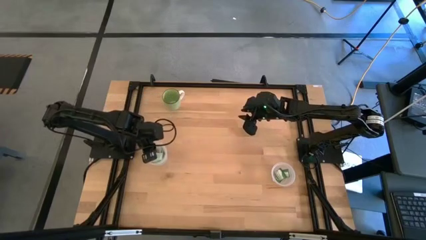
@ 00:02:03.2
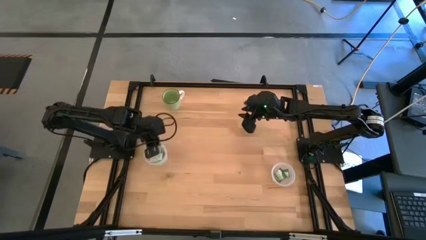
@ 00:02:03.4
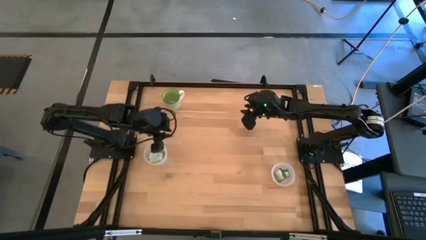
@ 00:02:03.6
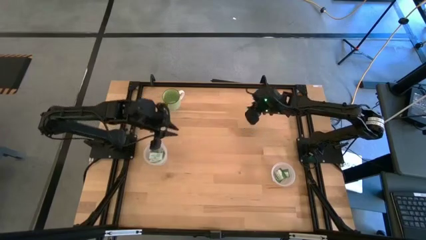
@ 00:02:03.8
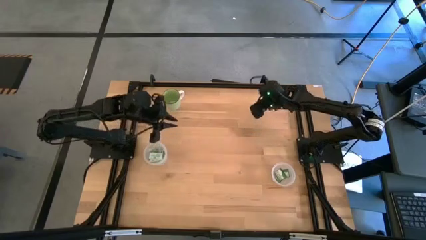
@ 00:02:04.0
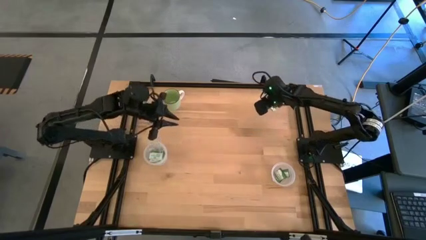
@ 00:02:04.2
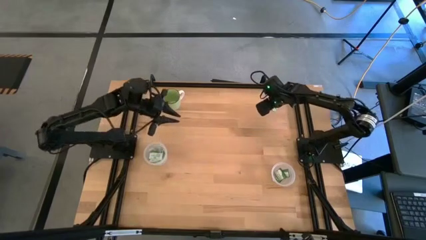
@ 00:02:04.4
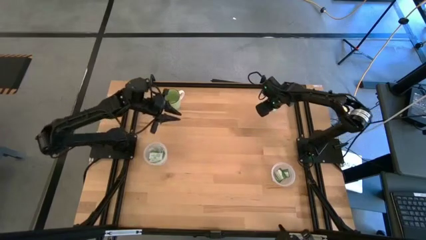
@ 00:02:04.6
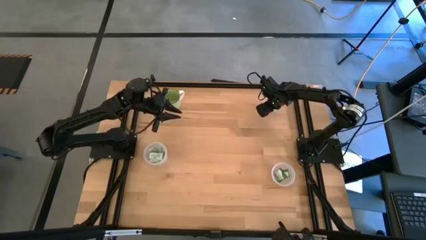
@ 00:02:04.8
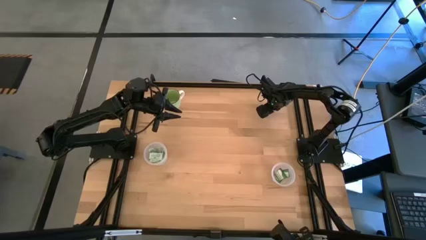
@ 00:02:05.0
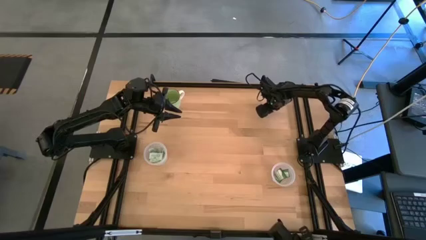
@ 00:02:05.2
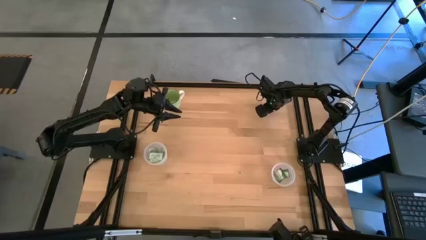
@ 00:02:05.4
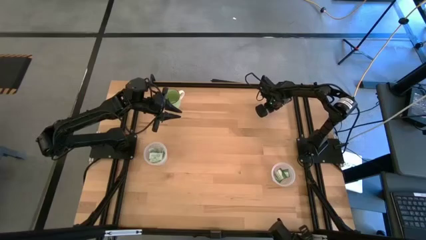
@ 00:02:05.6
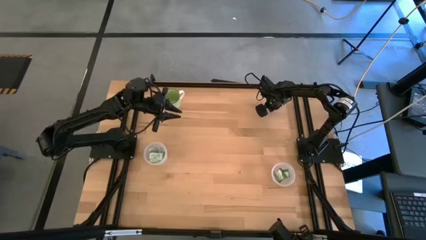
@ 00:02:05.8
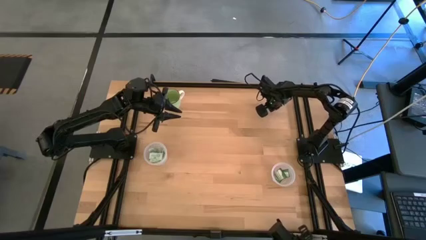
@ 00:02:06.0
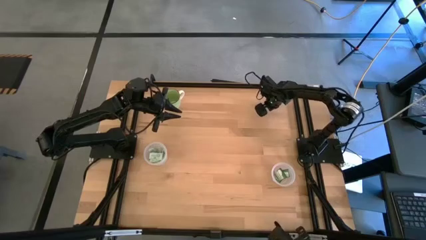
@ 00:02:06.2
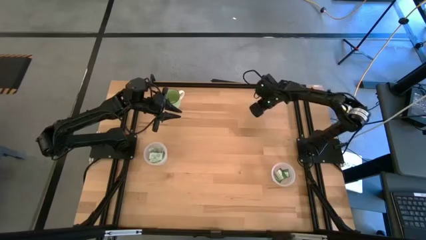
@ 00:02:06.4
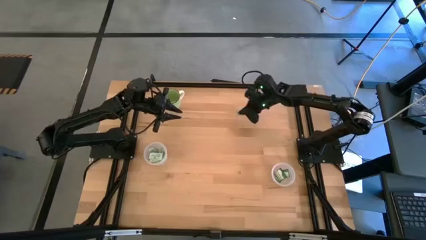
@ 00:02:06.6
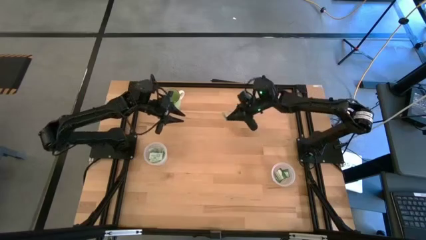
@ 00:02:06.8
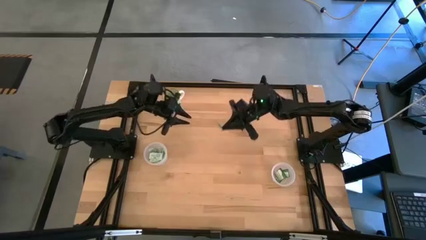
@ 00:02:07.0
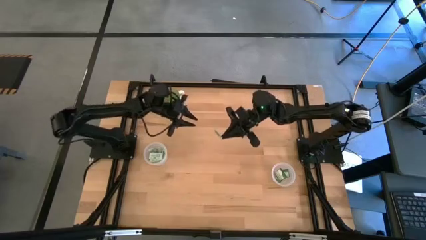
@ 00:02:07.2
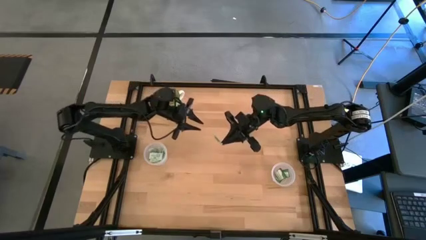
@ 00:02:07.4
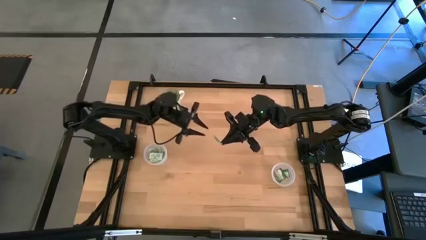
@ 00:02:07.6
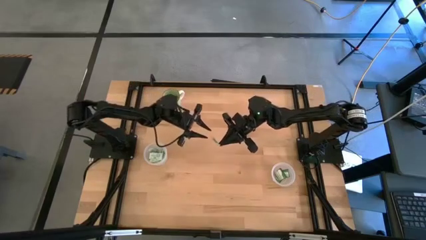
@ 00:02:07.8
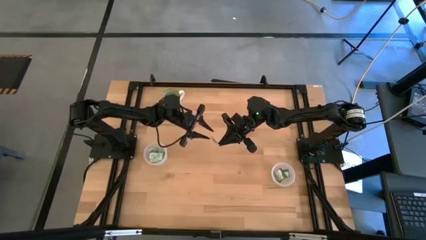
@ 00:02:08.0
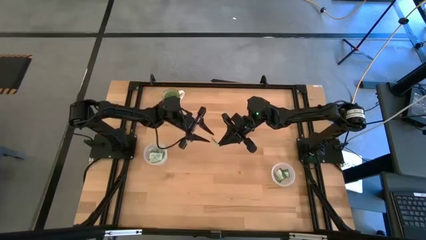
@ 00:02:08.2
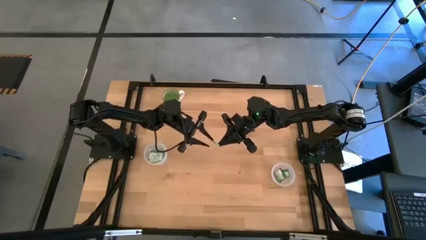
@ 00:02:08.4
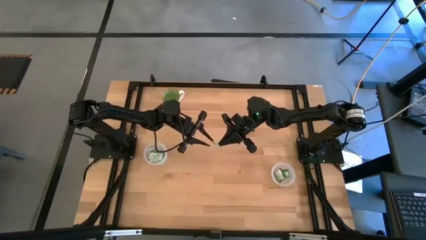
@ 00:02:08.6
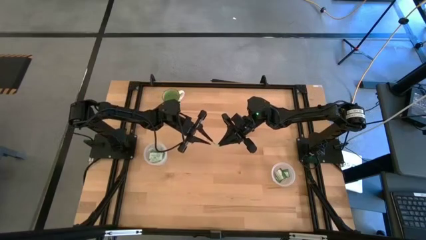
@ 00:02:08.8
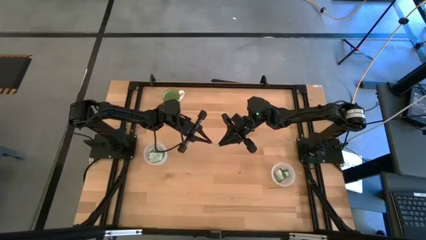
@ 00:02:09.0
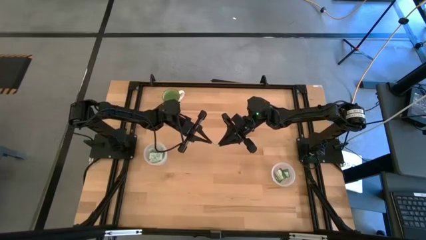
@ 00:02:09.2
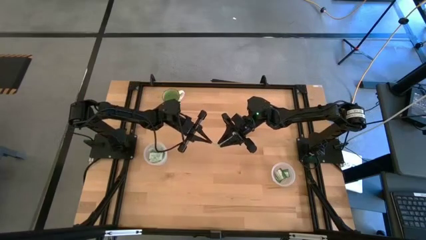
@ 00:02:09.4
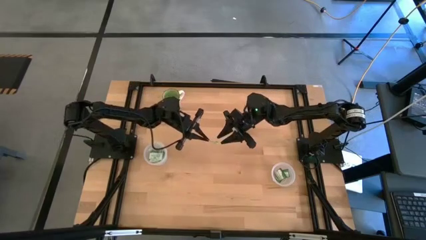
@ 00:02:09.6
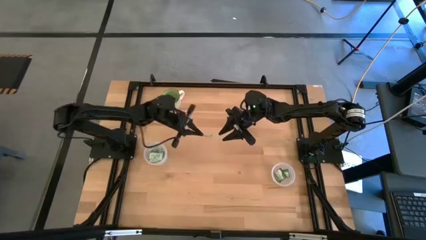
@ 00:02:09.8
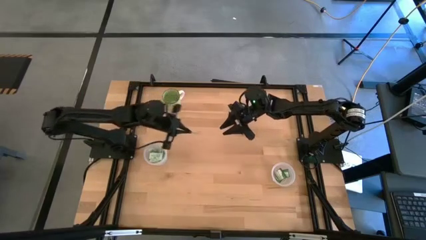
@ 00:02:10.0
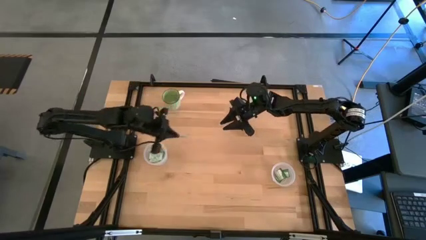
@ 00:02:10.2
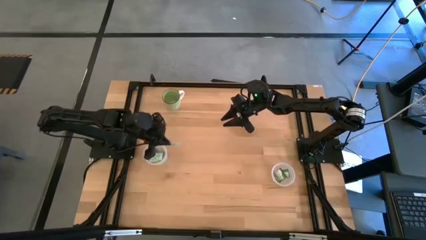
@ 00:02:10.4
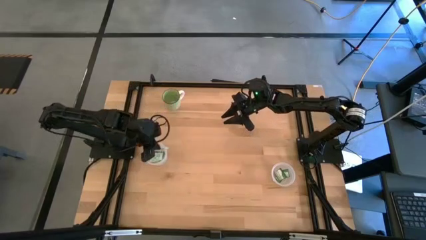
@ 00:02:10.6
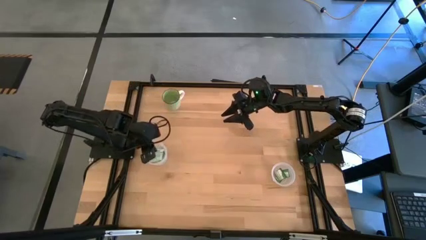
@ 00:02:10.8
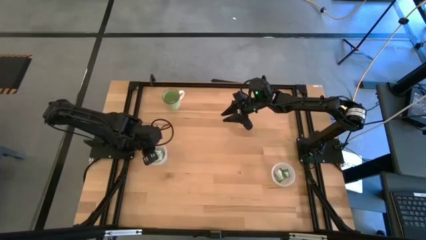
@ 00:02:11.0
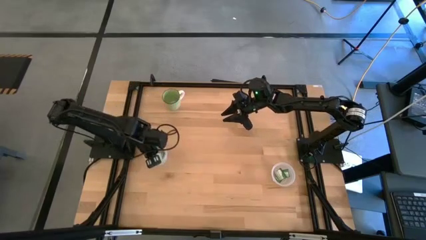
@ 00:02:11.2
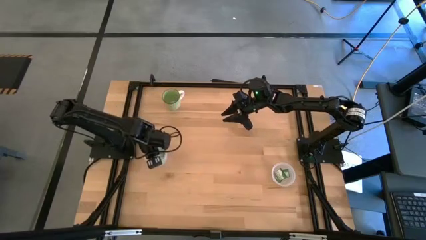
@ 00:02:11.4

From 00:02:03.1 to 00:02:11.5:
Task: Pick and place items into bin
Put the stevia packet into the left transparent bin

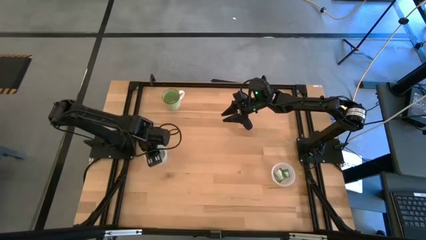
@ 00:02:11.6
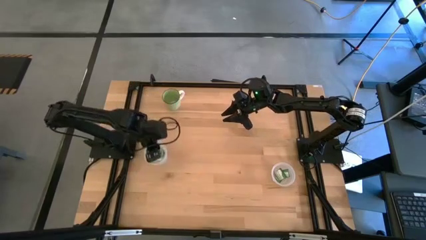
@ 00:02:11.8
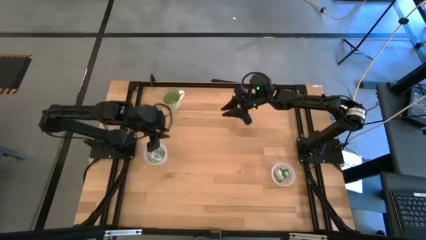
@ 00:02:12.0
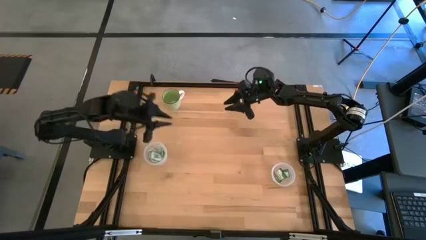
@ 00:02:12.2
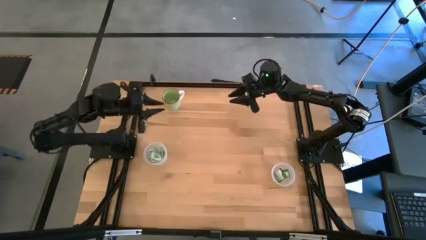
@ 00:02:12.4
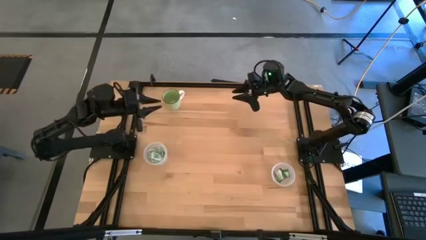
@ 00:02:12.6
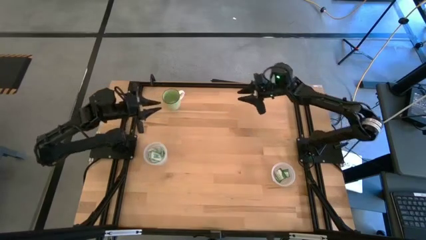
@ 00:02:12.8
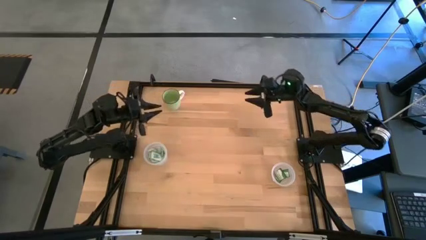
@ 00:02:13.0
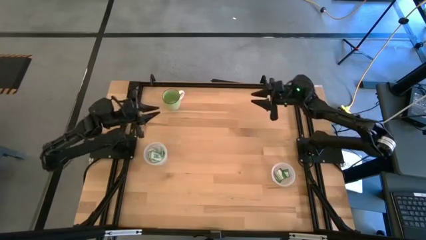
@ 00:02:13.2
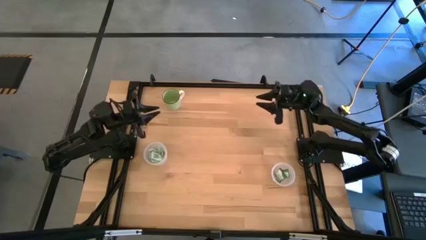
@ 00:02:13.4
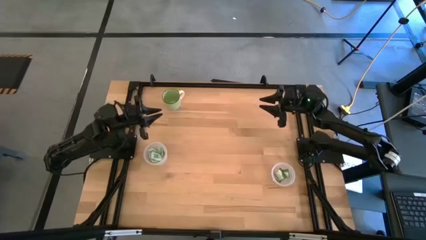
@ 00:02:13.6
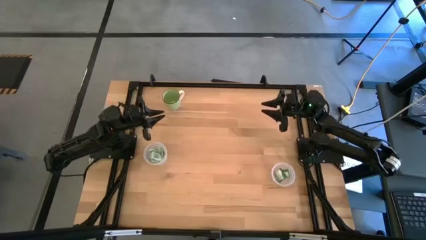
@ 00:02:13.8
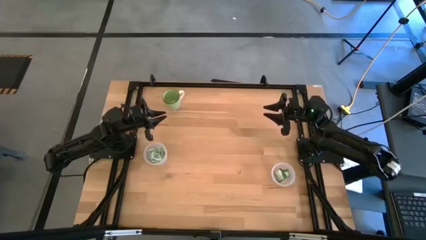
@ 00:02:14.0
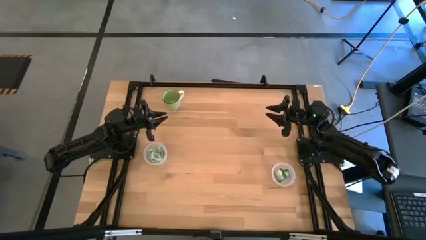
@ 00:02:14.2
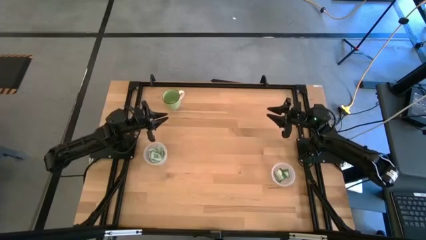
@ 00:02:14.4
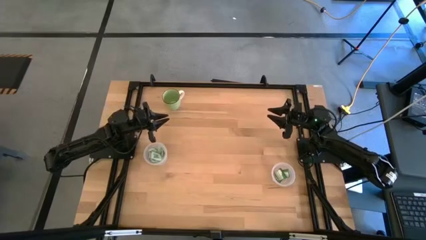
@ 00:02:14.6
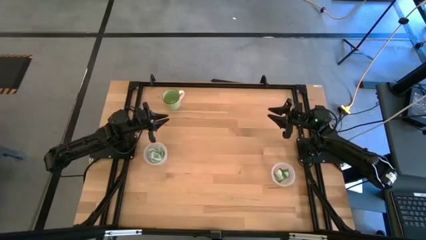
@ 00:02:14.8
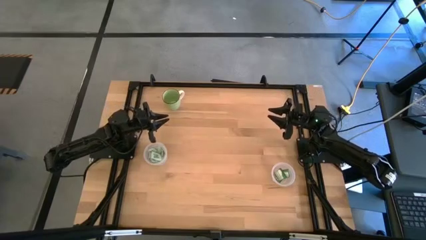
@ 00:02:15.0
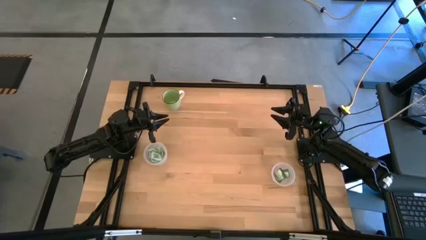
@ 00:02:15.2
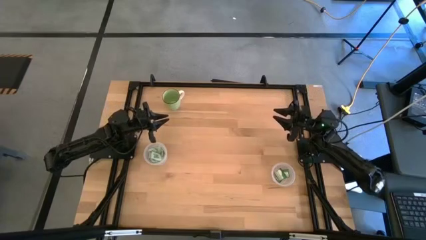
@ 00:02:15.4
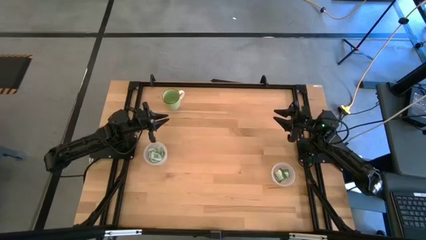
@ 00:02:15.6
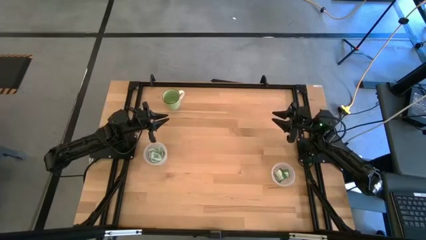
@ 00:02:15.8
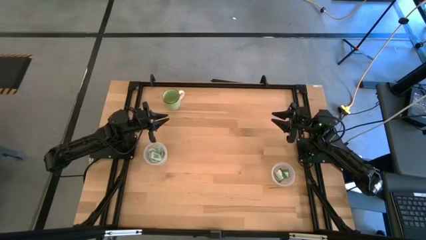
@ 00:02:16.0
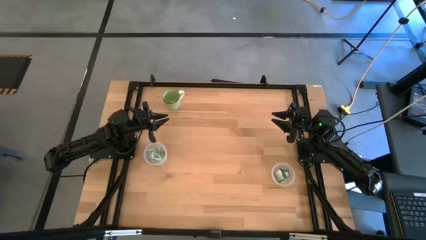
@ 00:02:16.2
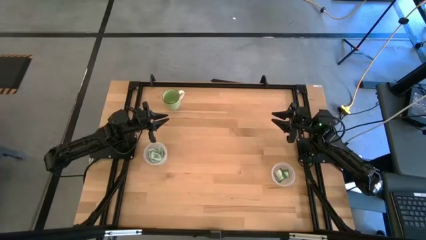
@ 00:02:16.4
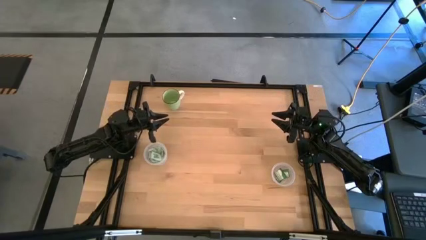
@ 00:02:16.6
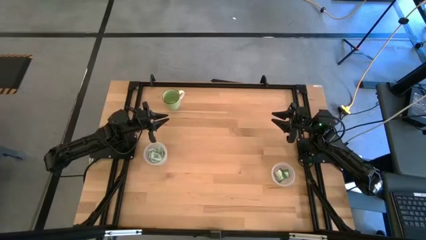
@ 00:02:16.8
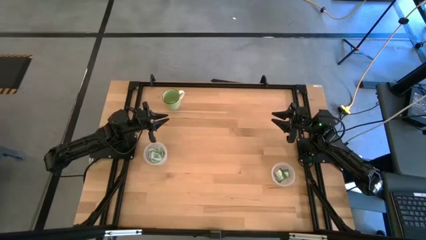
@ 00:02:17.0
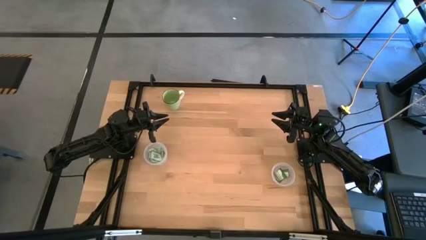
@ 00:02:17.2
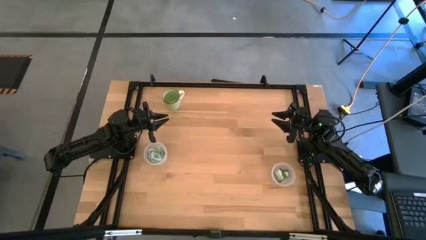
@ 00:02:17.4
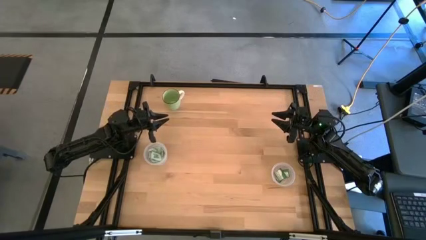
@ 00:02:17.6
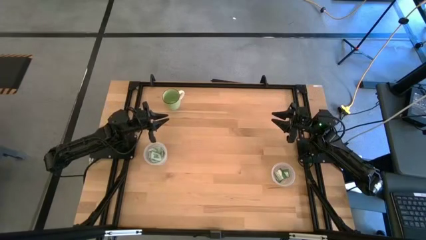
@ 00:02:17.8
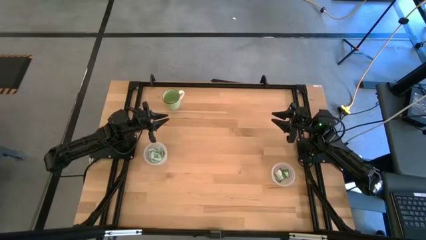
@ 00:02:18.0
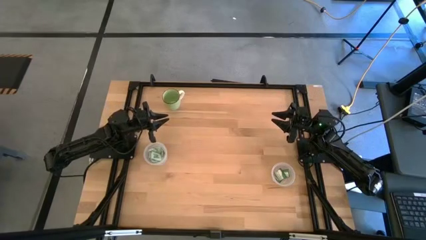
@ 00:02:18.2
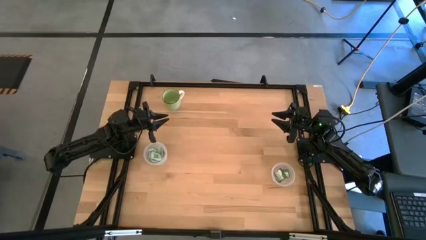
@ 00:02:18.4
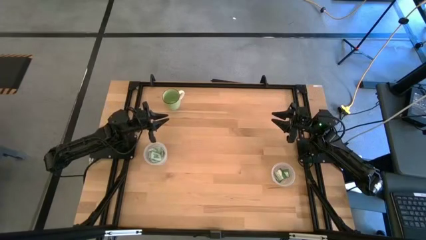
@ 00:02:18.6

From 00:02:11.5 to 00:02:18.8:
Return to Home Position
